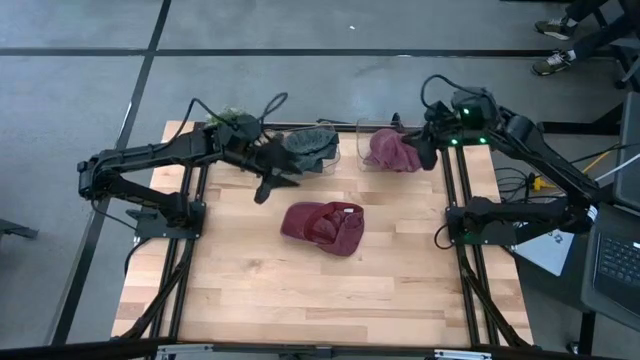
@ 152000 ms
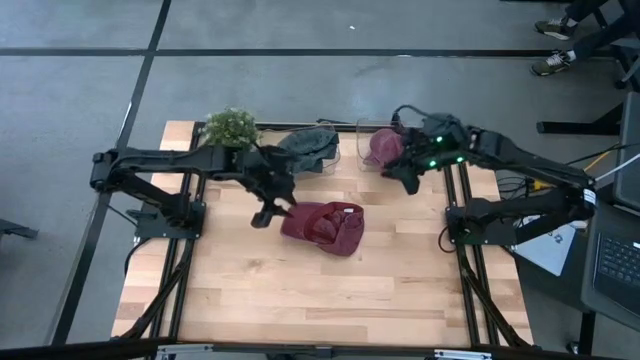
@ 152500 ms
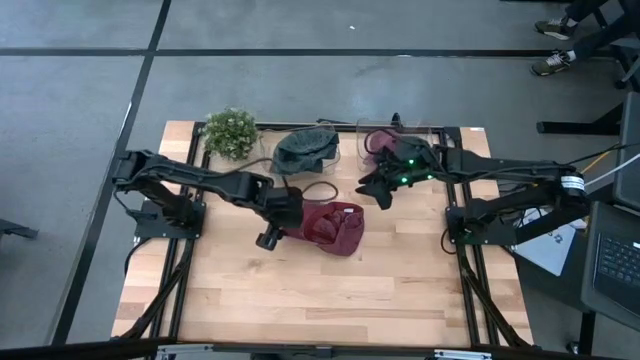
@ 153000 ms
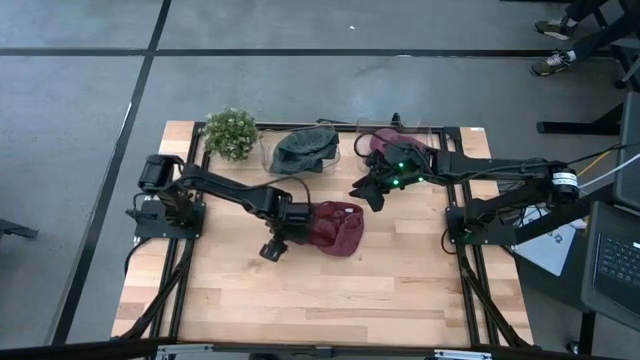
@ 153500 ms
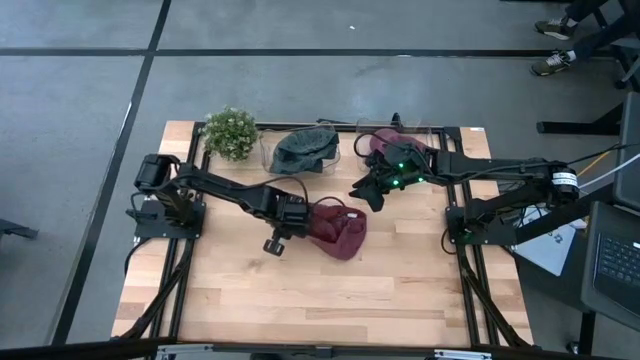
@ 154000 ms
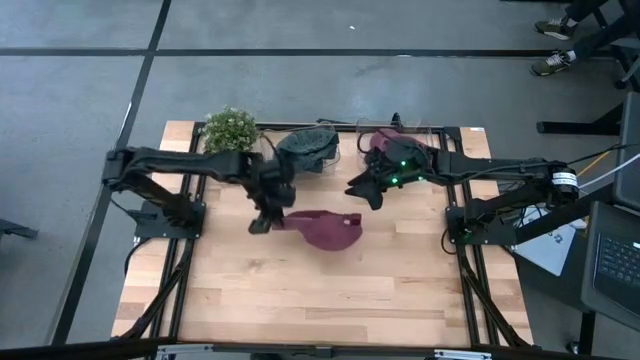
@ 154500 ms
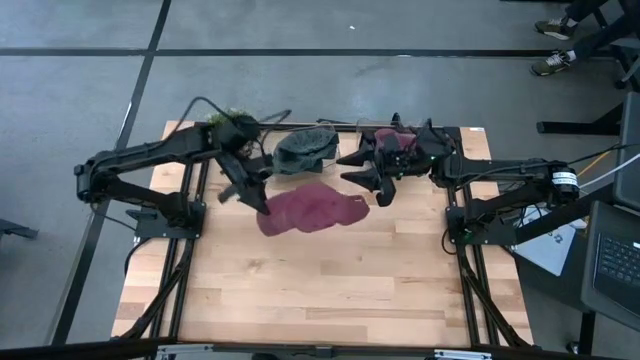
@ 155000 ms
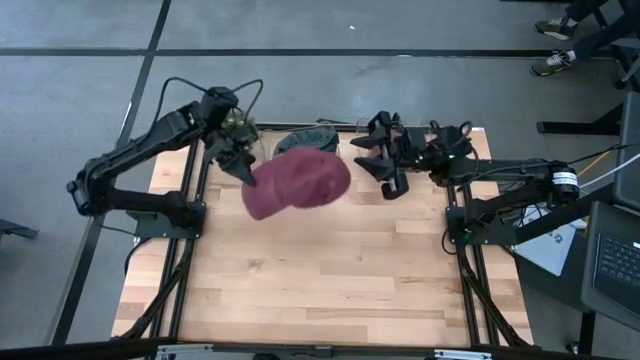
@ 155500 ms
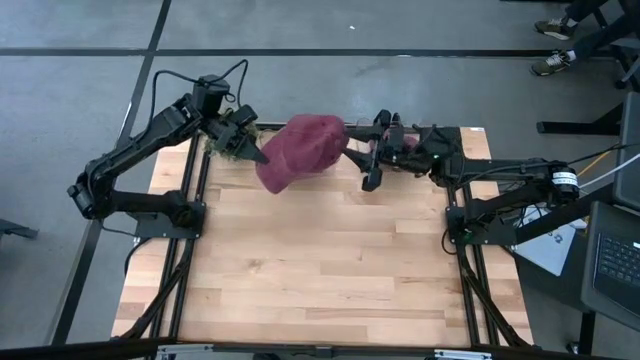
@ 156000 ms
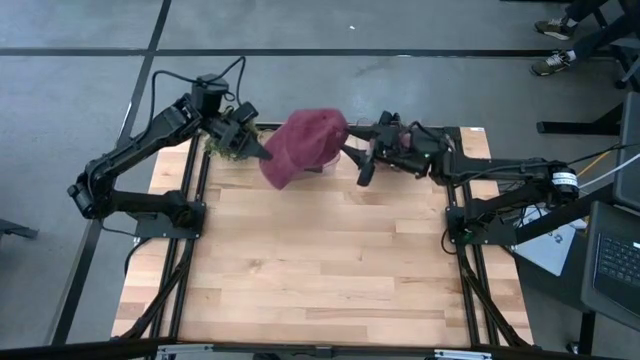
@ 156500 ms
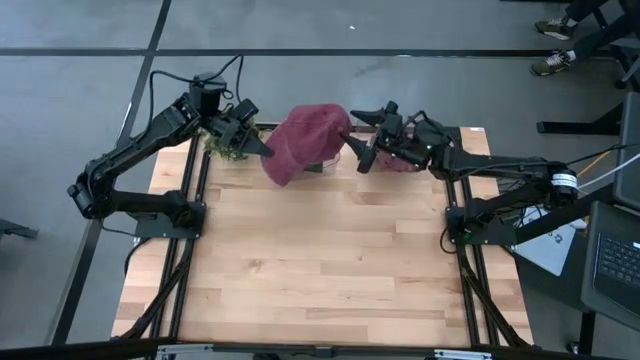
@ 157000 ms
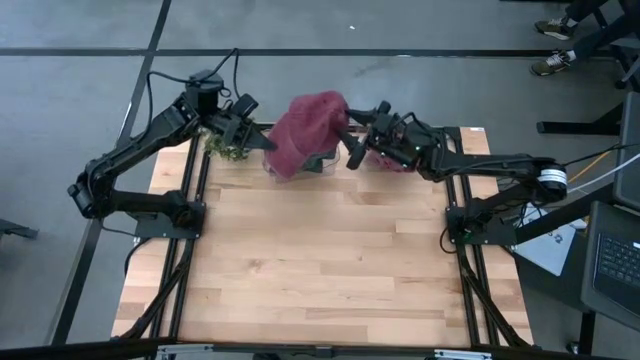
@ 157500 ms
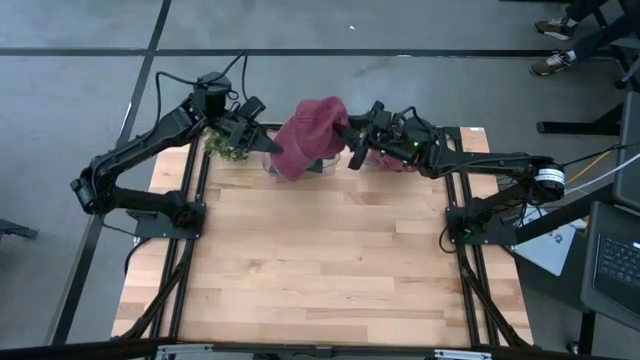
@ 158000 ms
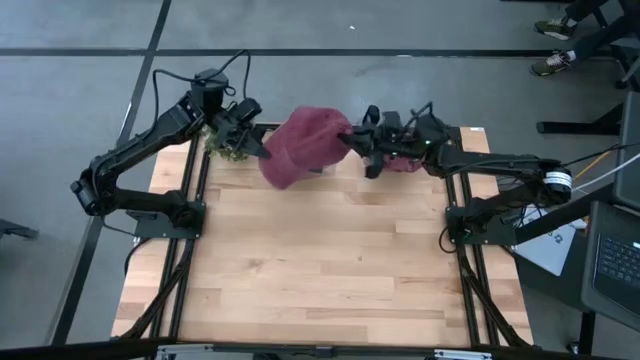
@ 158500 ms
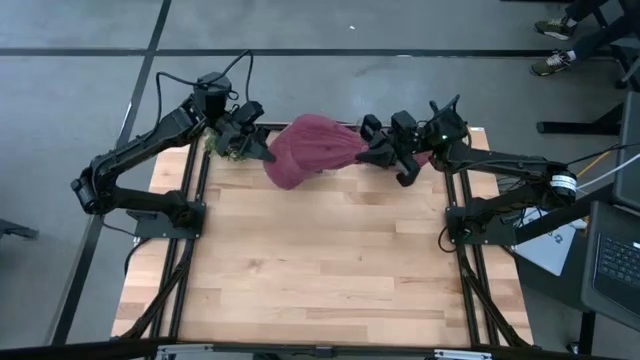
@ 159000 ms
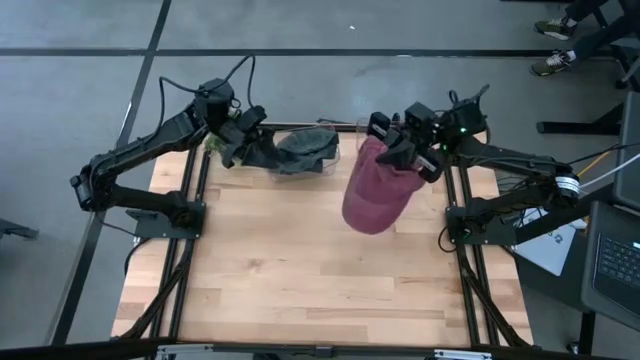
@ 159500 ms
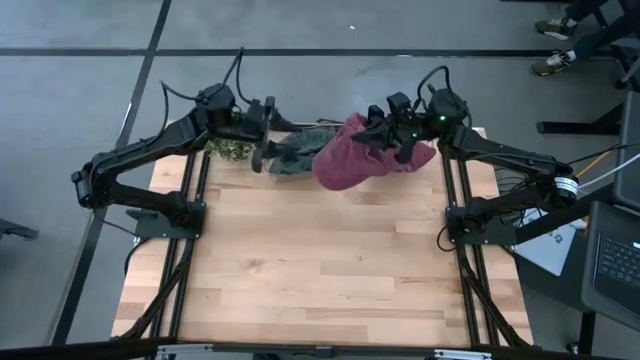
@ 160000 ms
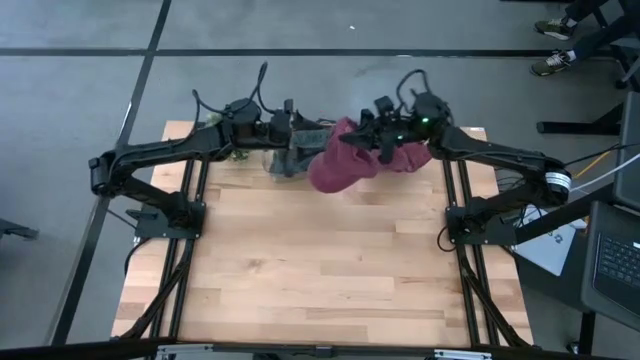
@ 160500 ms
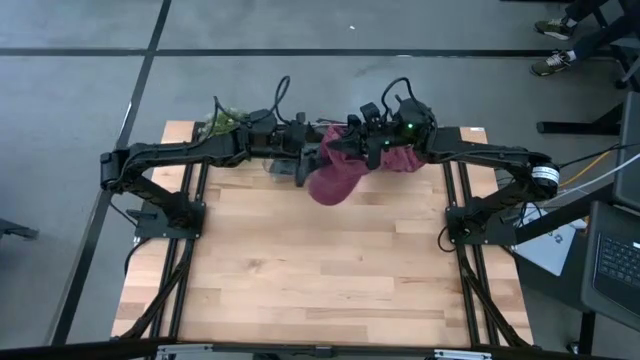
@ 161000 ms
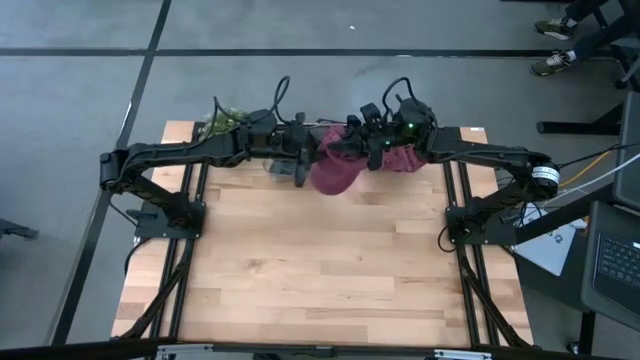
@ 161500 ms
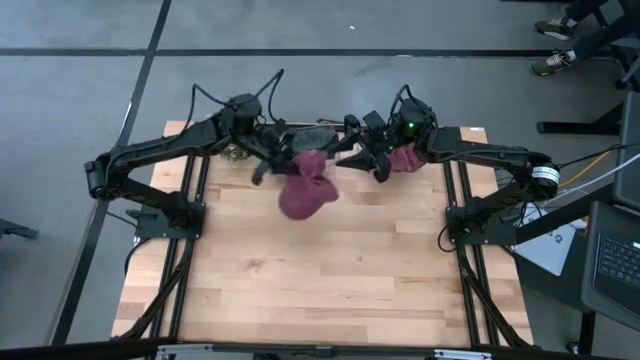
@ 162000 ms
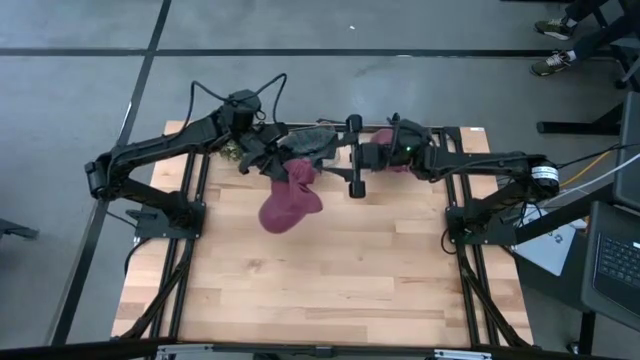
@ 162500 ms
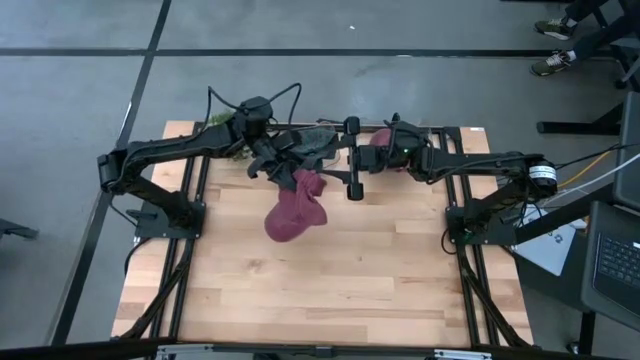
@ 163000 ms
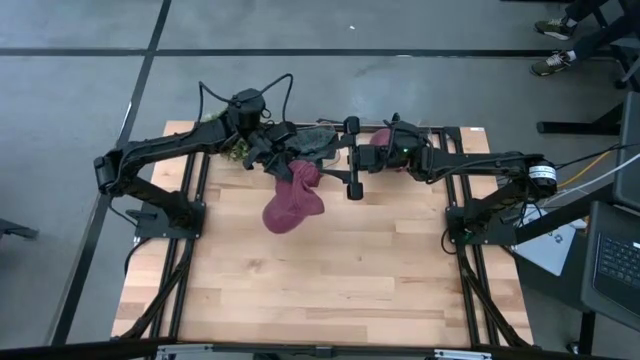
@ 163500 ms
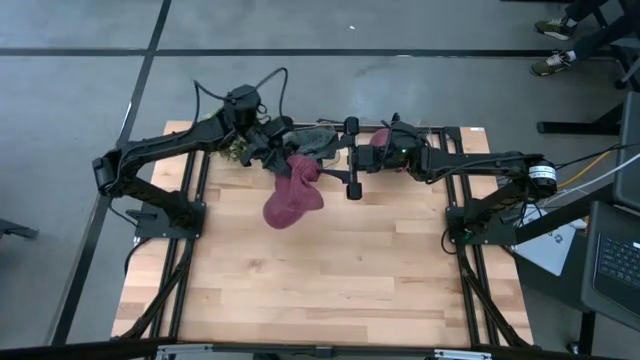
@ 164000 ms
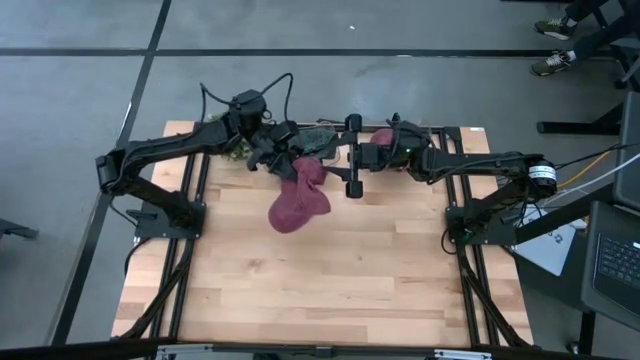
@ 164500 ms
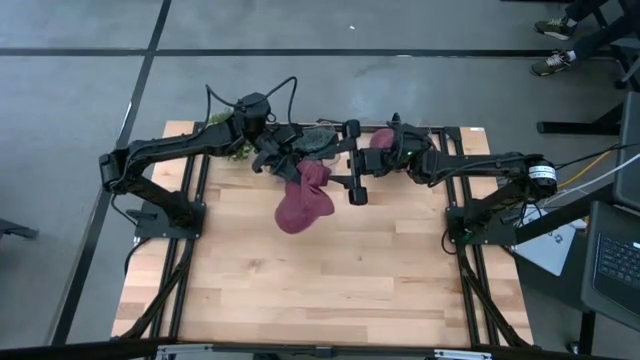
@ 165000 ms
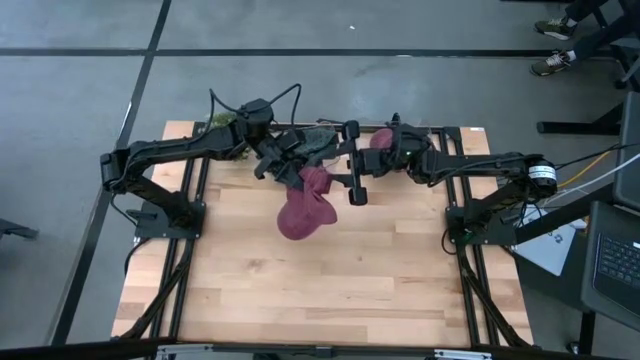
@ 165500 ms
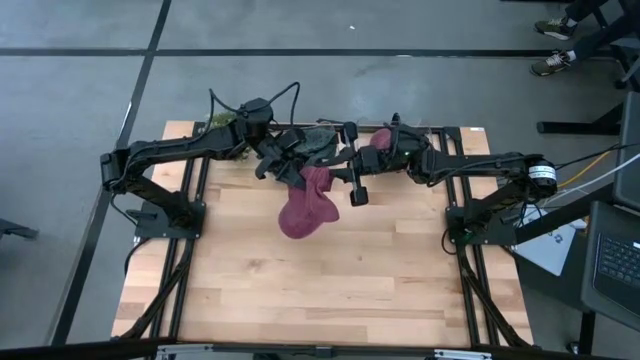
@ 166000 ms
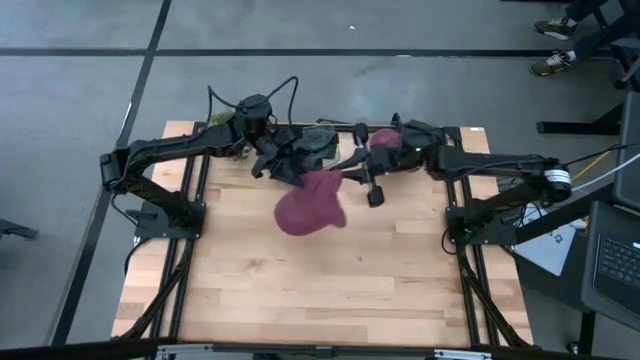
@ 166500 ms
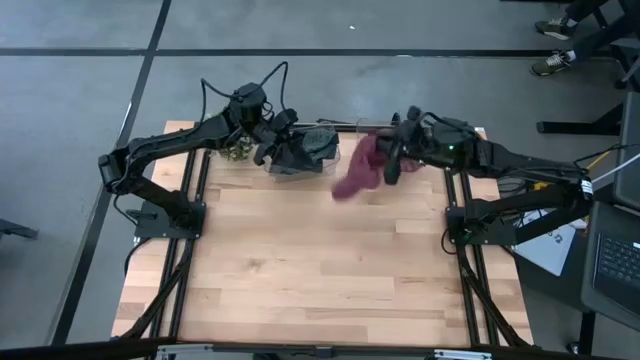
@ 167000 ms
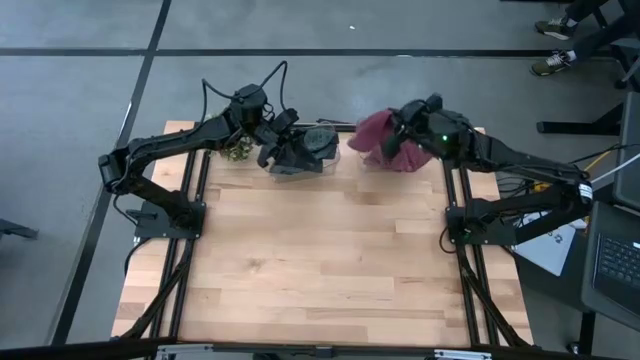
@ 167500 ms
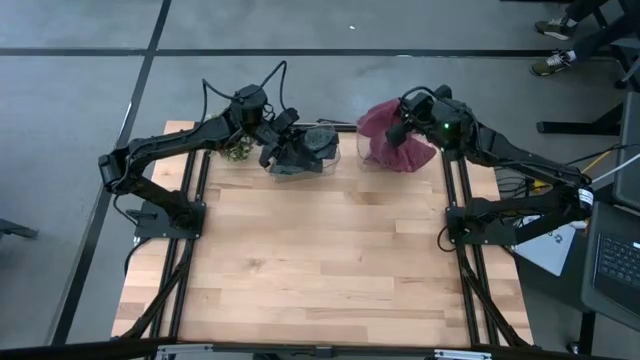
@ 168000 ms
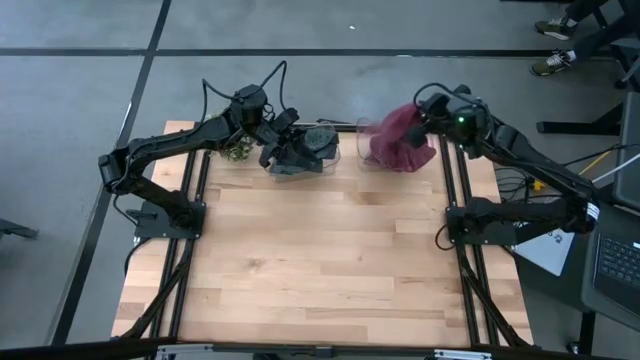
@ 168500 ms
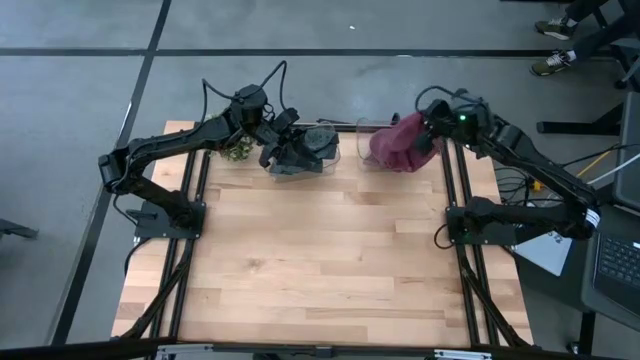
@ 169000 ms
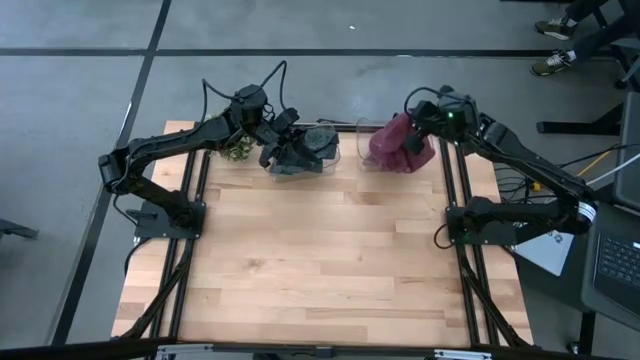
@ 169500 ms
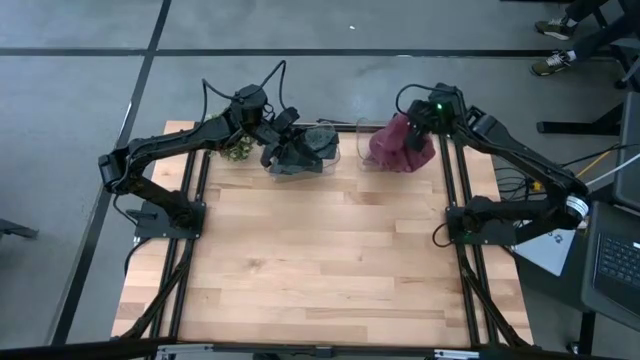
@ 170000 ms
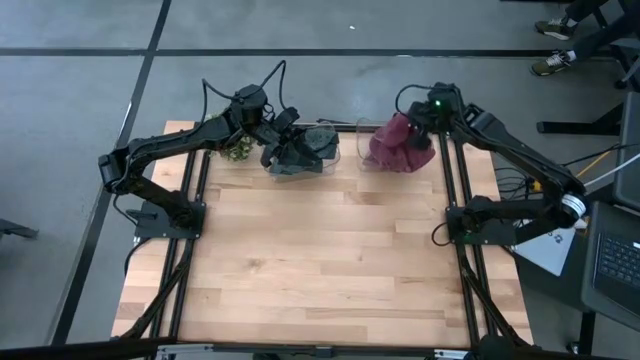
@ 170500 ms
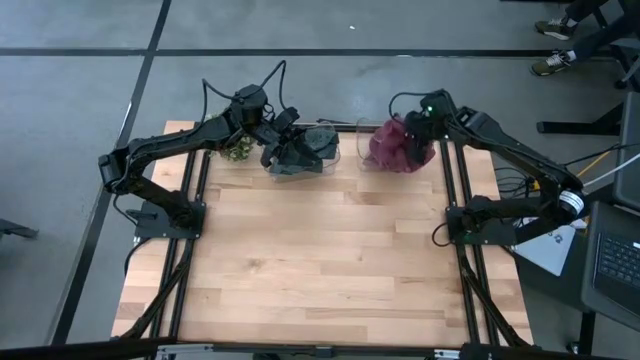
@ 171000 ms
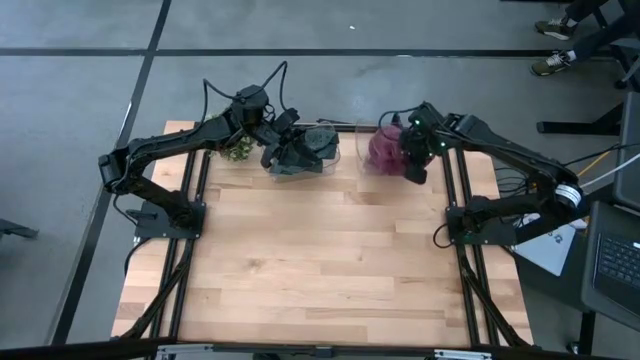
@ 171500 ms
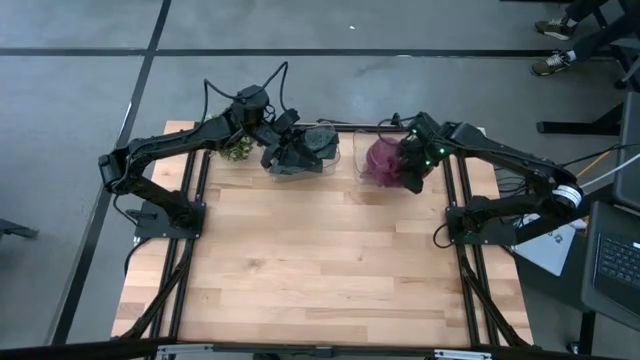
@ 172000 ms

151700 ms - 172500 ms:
Task: Pick & Place hat
Put the red cap on the red cap in the right transparent bin

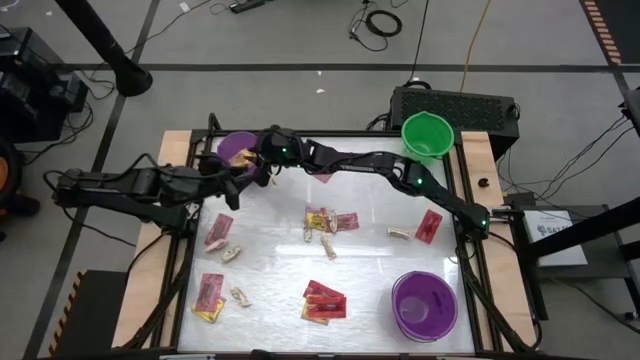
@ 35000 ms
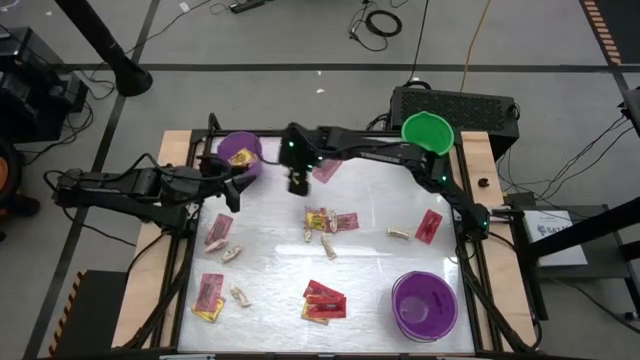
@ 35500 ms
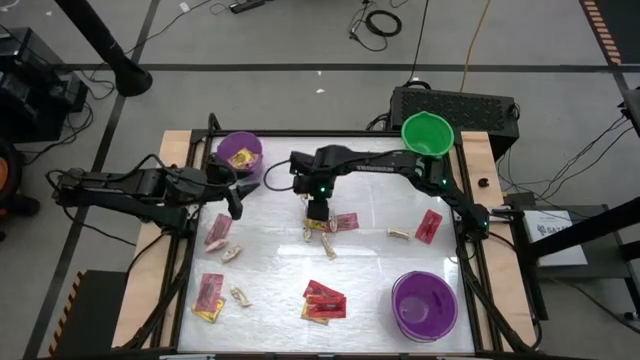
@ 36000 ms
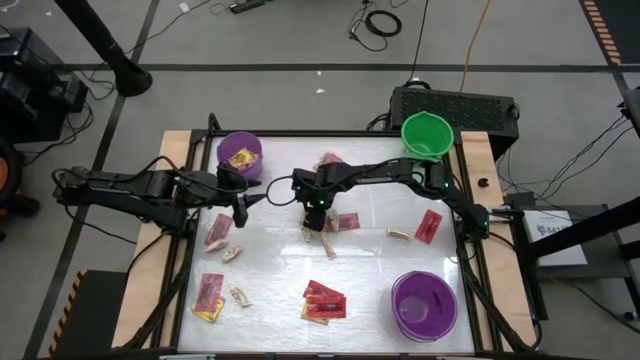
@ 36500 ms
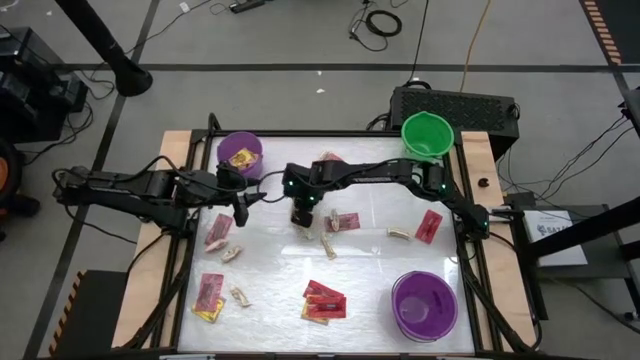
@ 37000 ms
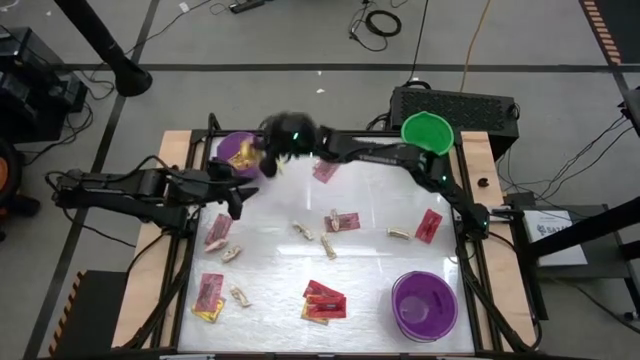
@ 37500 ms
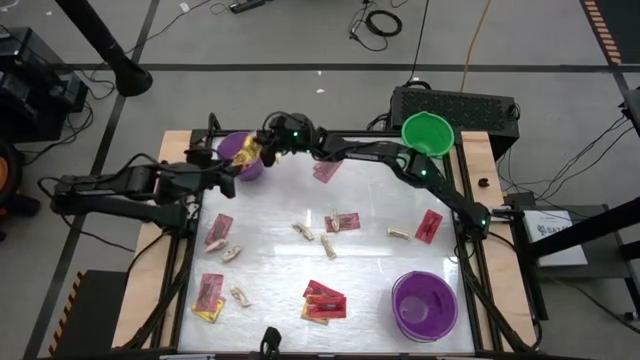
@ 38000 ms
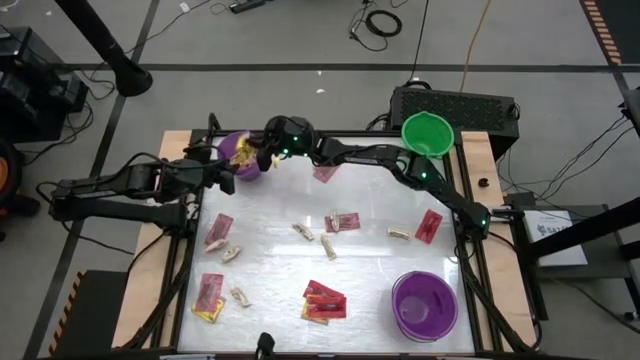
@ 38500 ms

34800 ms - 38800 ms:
Task: Sort candy by brand, put in halloween buckets
Put the yellow candy into the top violet bucket
